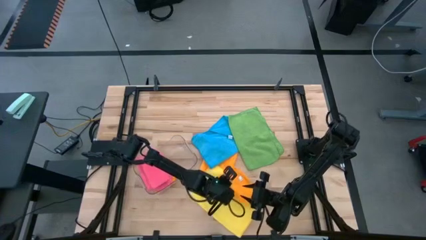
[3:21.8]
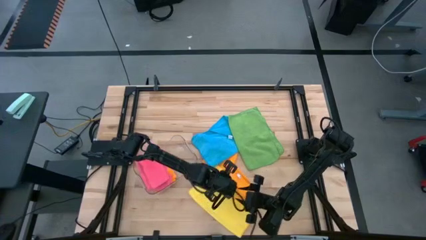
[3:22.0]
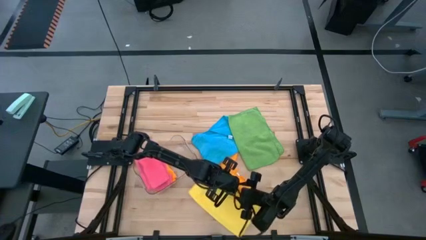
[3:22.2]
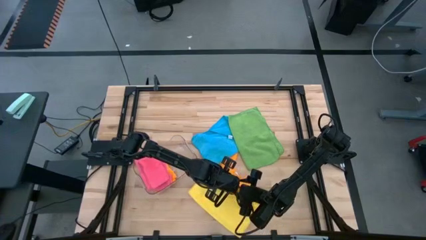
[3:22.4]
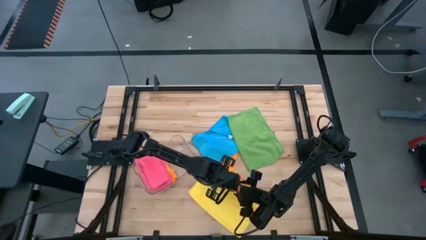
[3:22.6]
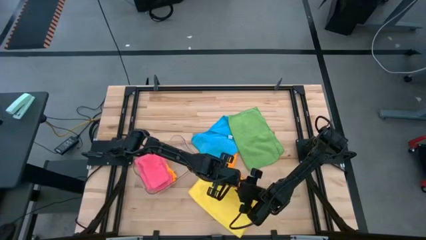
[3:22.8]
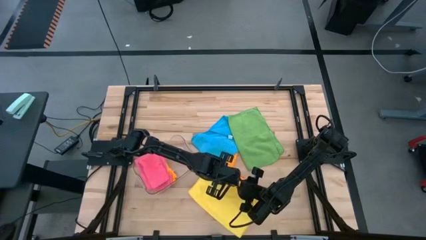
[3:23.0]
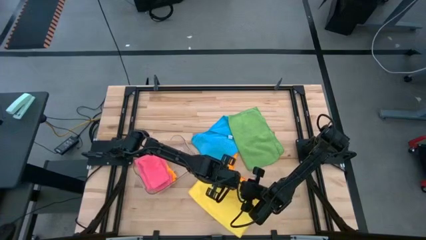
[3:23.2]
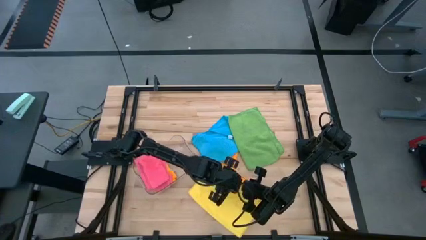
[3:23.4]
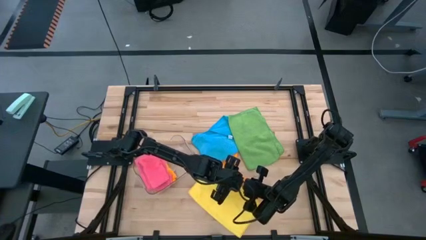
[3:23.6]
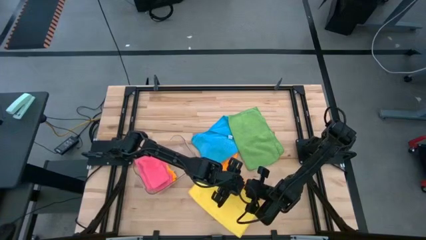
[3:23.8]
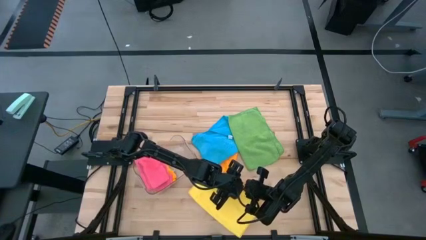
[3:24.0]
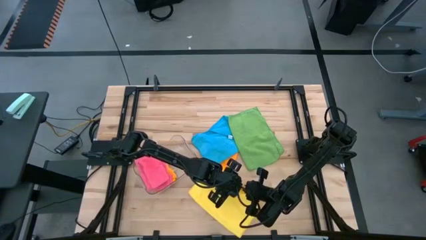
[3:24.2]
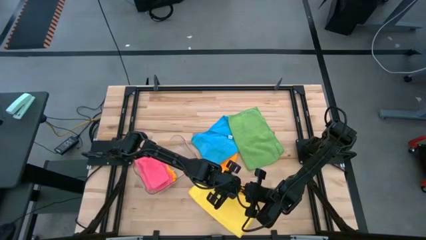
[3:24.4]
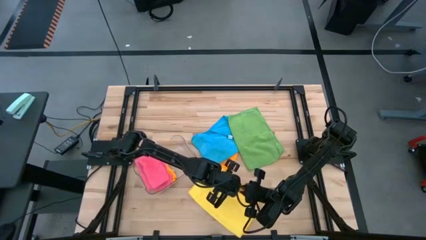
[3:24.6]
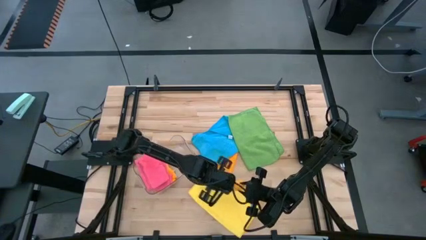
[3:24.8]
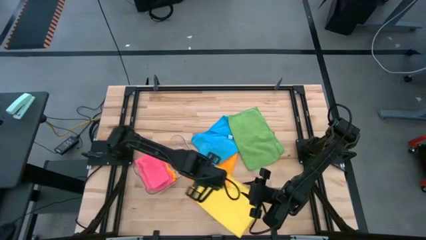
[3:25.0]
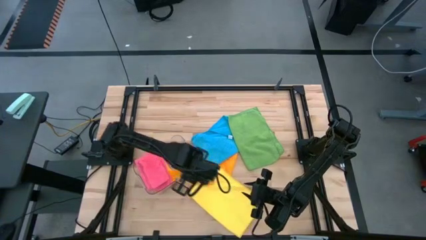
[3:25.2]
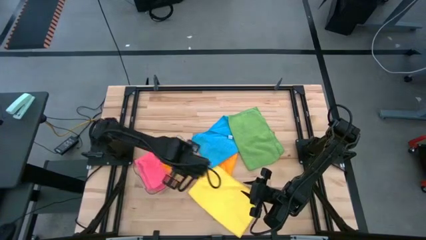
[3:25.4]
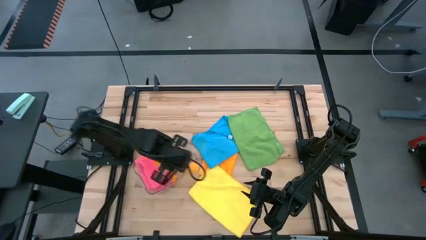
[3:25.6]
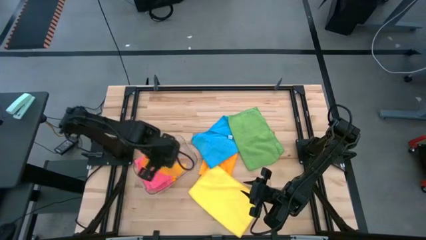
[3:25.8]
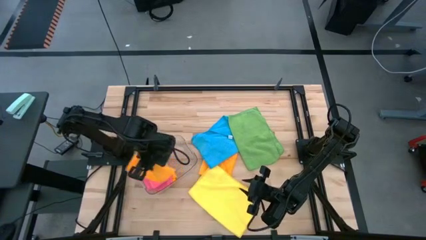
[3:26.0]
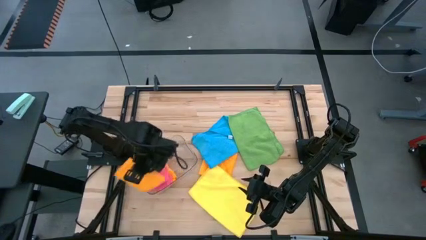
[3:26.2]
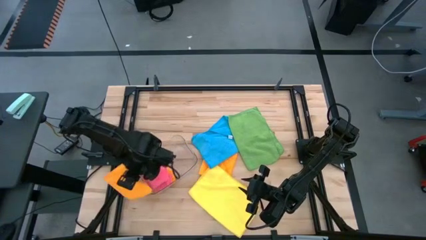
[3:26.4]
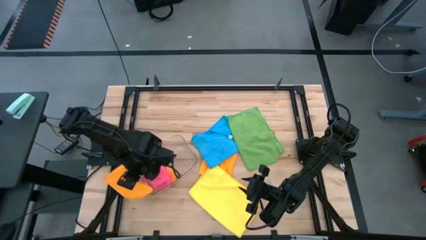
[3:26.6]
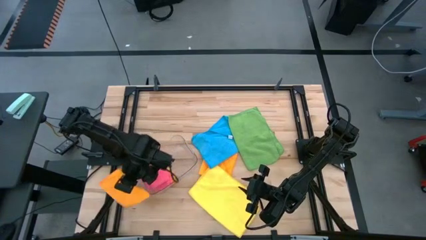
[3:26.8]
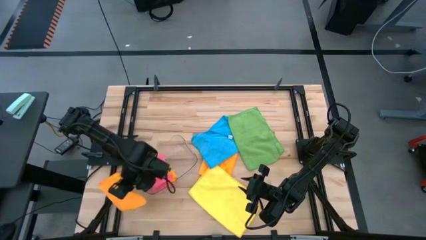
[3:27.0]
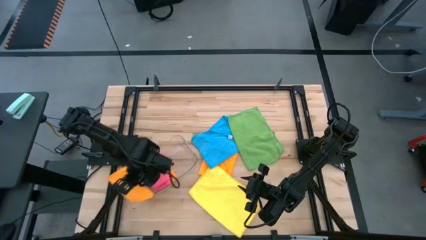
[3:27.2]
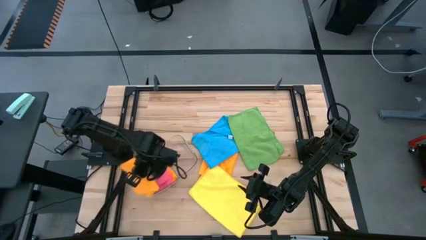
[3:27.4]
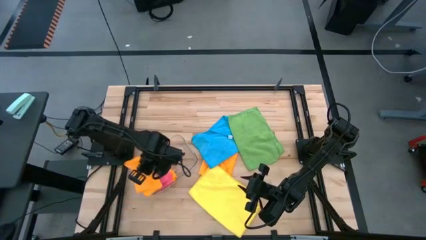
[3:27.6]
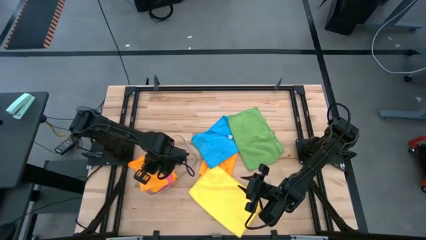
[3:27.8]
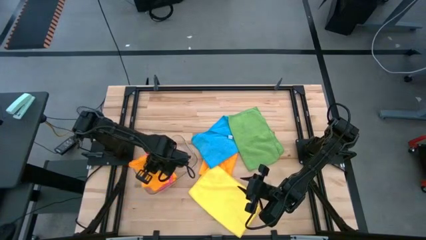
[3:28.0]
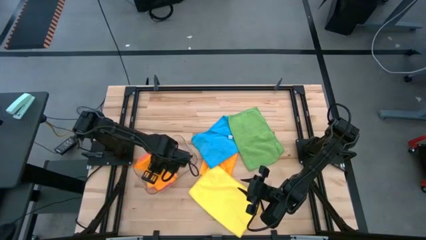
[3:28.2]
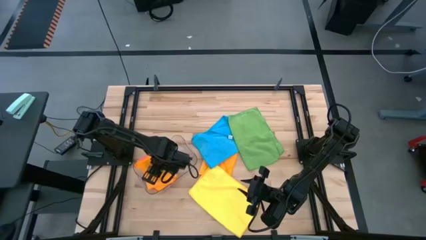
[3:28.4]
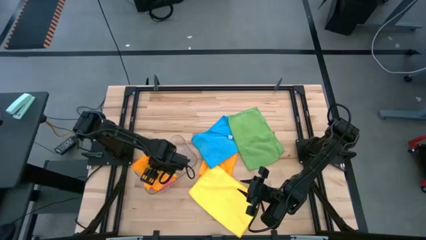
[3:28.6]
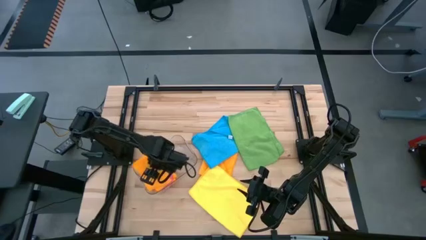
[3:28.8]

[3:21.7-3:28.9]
Task: Fold microfiber towels
Put the folded orange microfiber cloth into the transparent bin

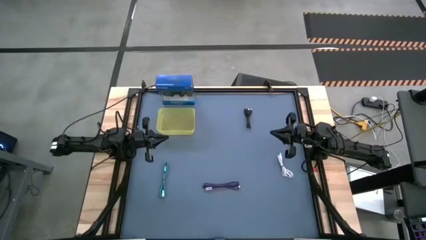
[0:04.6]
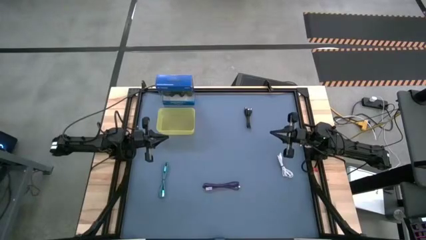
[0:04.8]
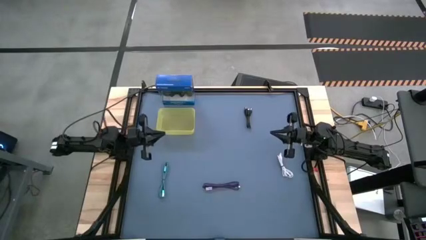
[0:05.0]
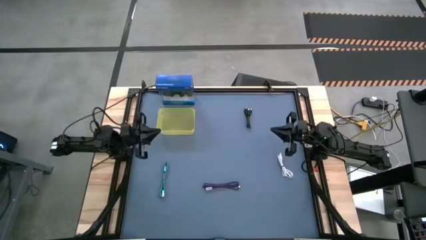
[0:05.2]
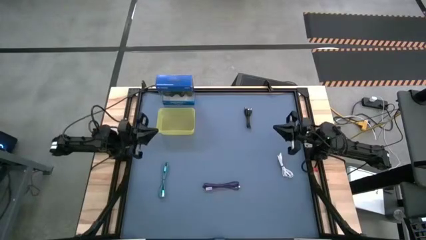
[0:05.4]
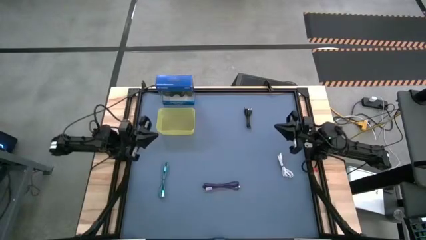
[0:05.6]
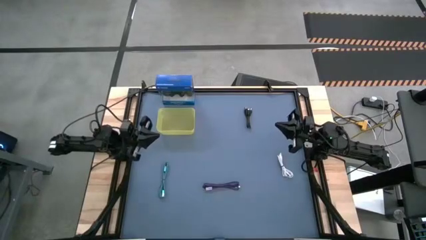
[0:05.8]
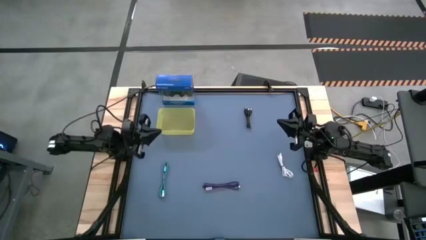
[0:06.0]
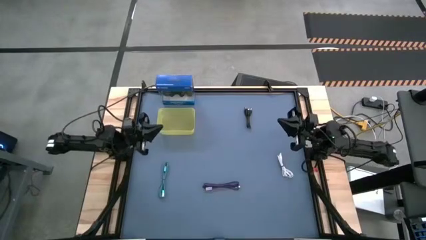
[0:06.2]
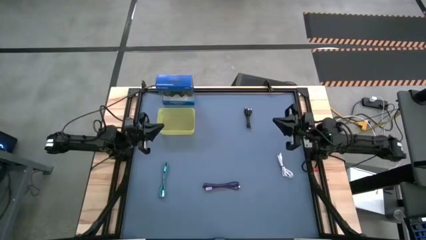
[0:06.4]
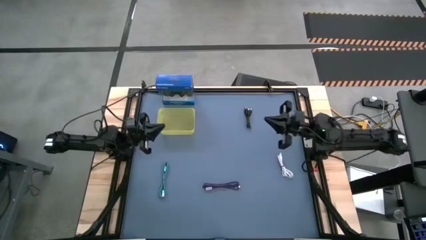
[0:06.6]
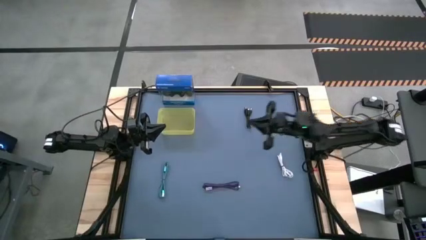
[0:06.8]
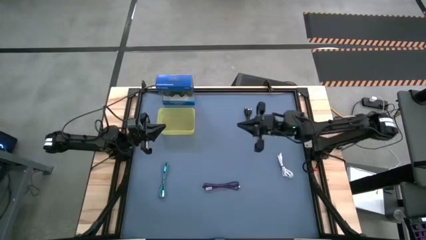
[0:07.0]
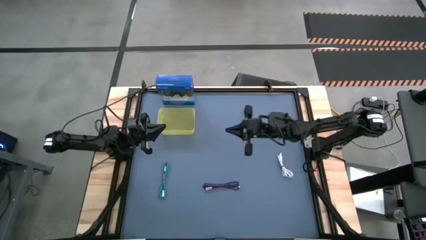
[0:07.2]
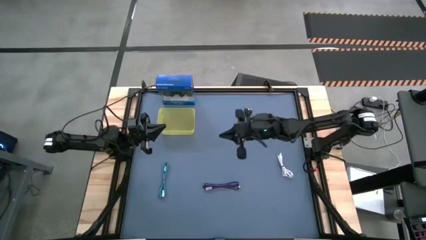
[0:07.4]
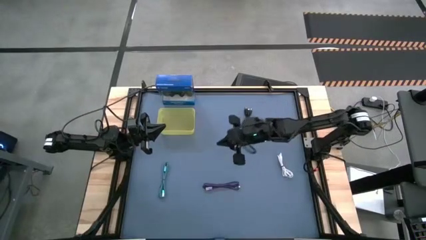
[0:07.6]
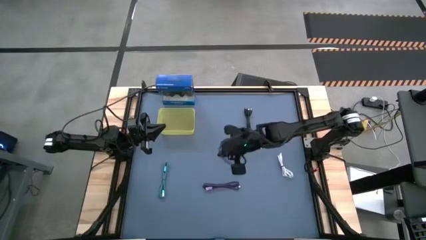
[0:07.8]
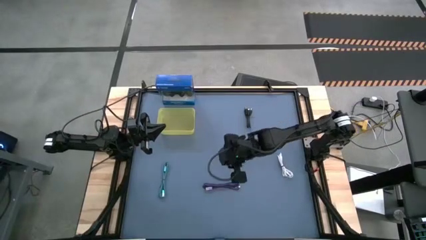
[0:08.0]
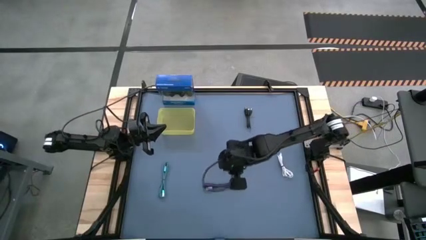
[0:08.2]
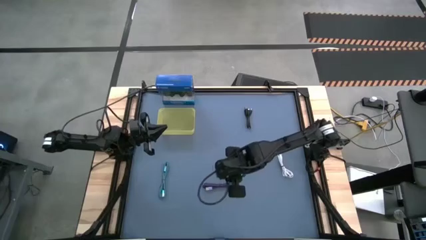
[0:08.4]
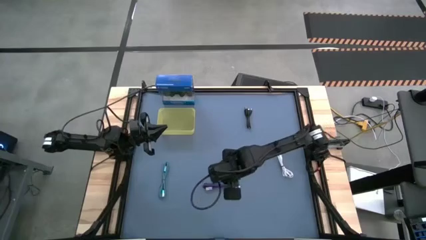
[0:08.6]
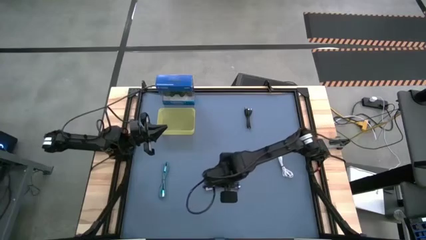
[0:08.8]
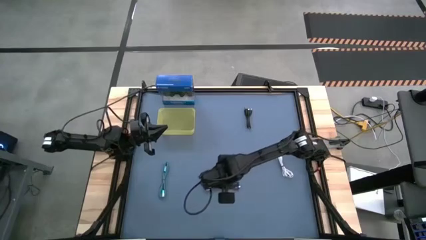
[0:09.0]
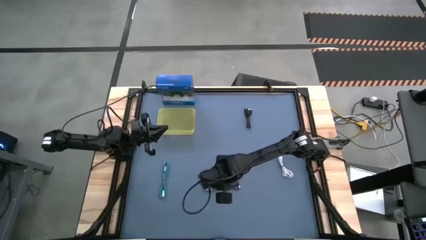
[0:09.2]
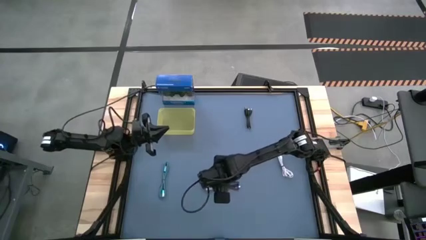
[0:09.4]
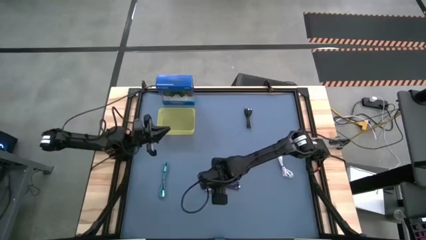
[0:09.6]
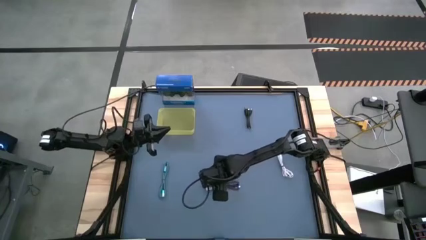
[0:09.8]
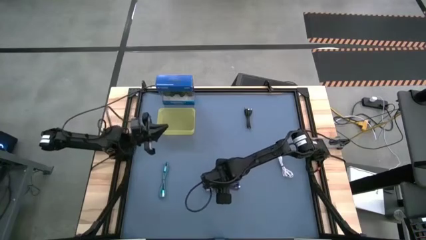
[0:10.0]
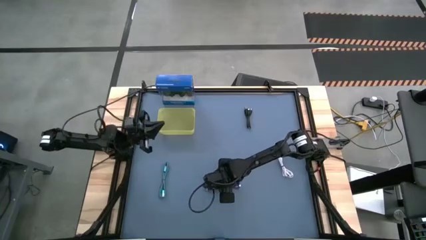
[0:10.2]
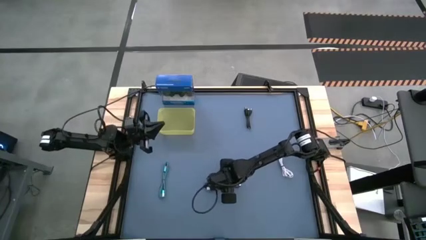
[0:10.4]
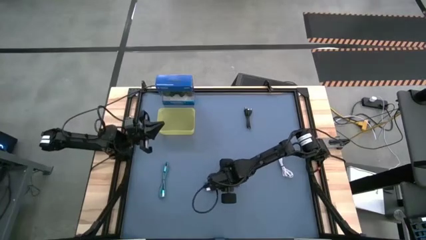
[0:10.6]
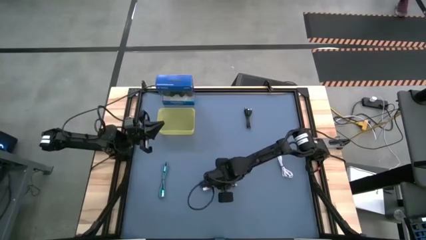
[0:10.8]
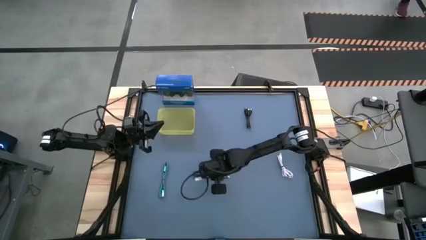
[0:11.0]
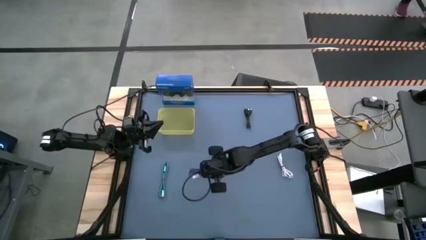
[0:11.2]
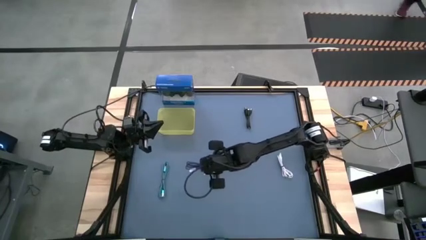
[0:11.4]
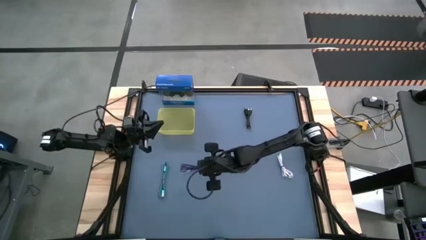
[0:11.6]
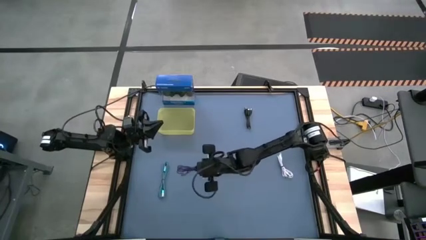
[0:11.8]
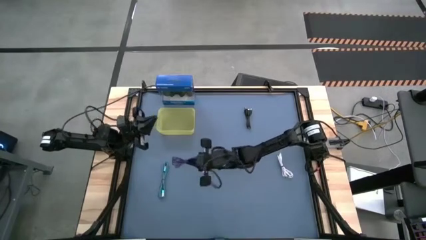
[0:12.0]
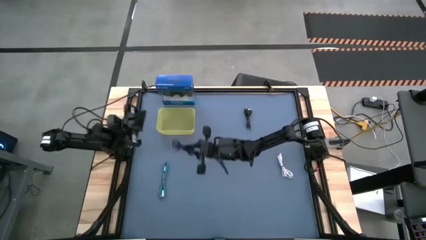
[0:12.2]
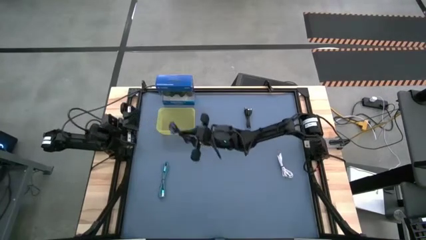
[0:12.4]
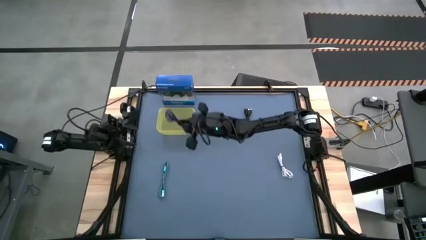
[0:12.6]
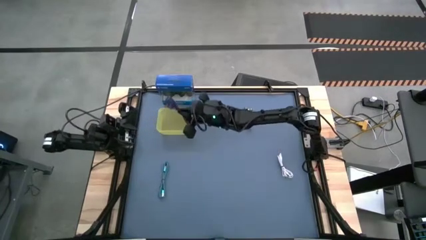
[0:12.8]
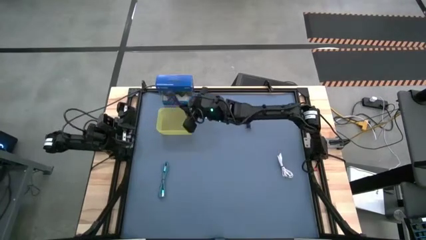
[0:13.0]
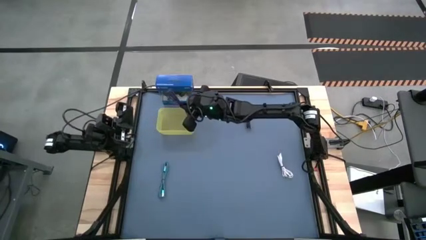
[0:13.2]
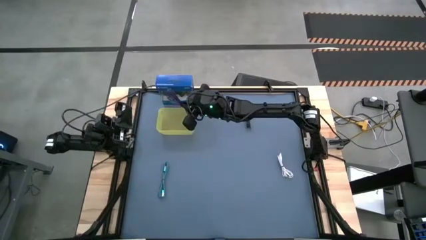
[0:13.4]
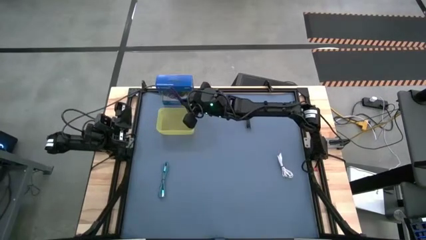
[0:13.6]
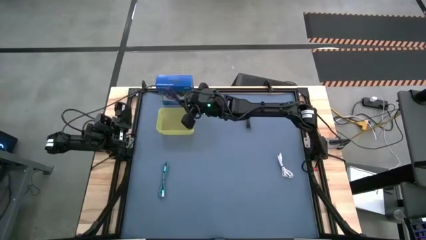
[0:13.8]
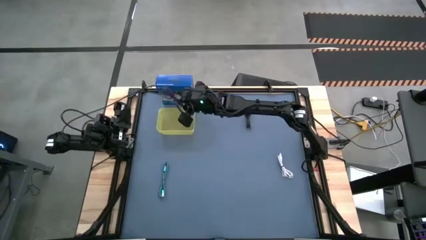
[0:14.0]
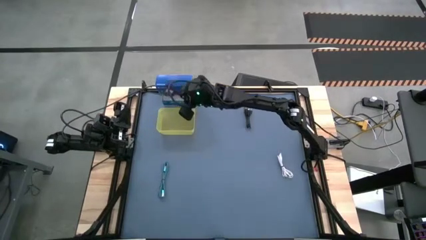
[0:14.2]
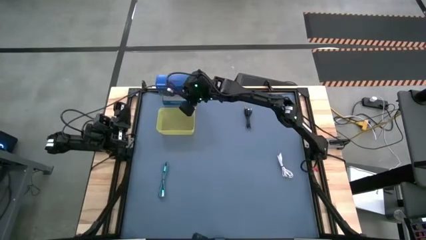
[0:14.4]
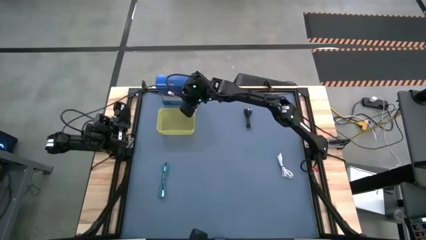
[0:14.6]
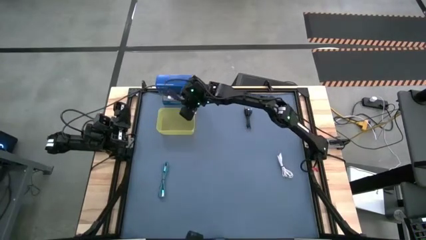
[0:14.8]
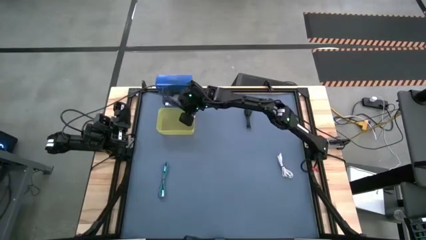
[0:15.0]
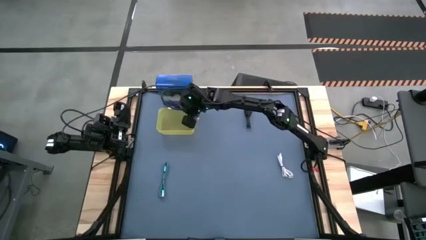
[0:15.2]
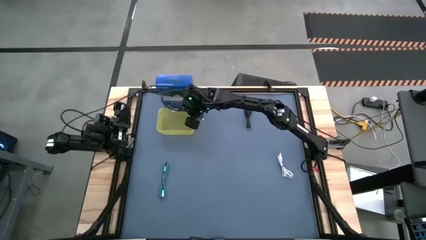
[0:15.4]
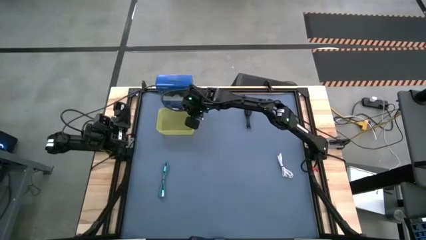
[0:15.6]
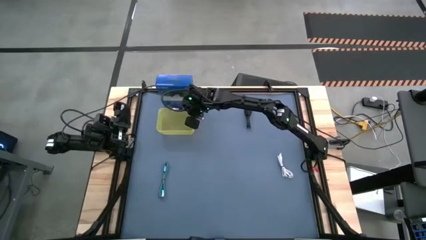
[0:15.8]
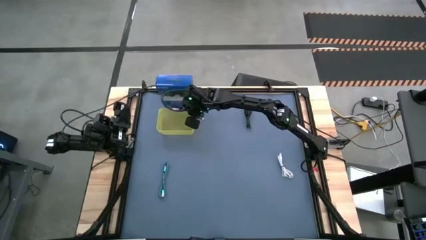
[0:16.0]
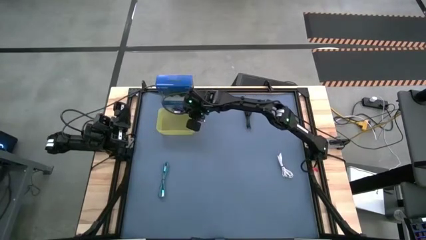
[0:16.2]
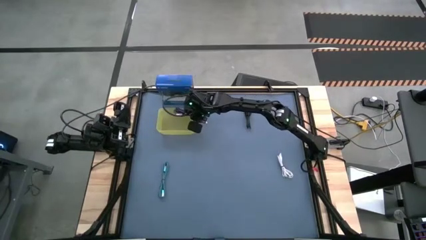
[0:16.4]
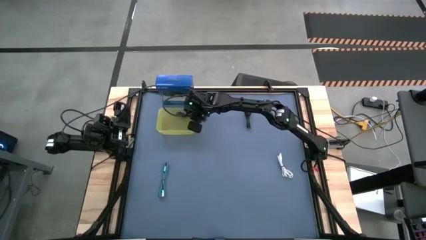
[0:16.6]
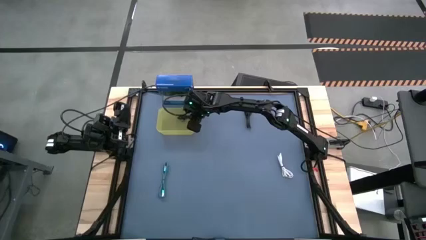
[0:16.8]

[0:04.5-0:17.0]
Task: Pick and place USB-C Cables
Put the violet charger cable into the yellow bin
